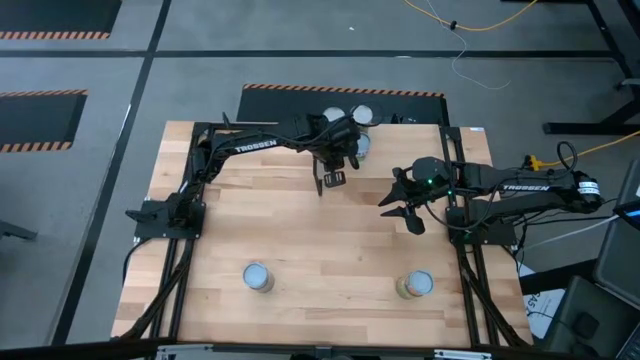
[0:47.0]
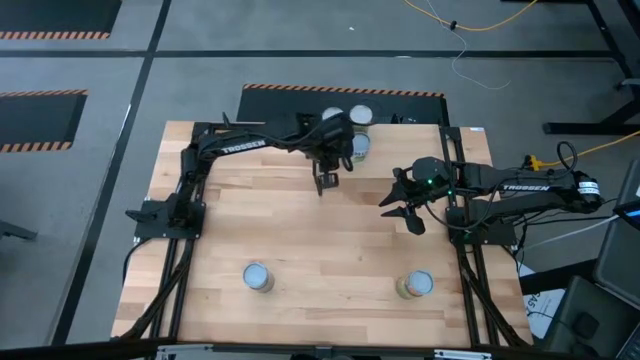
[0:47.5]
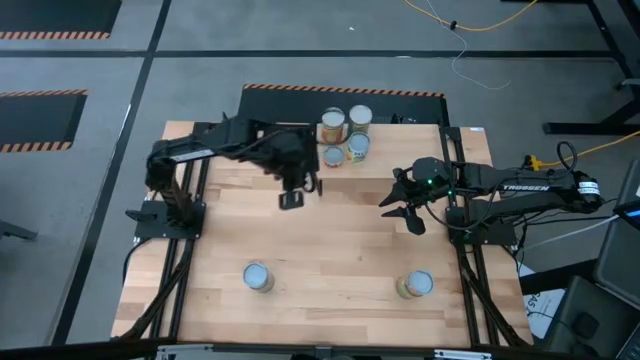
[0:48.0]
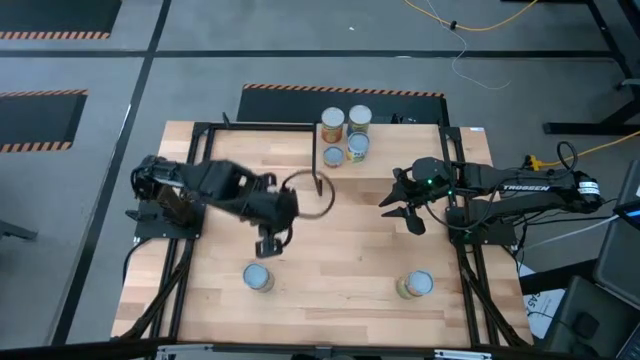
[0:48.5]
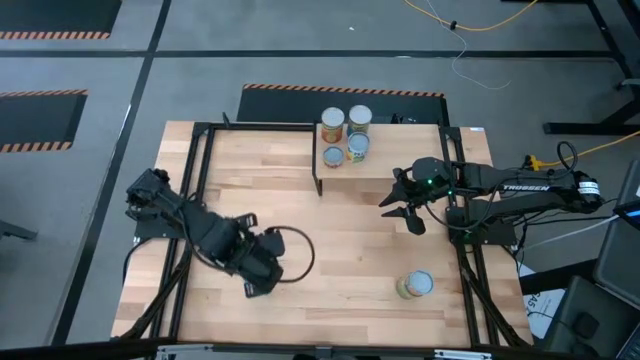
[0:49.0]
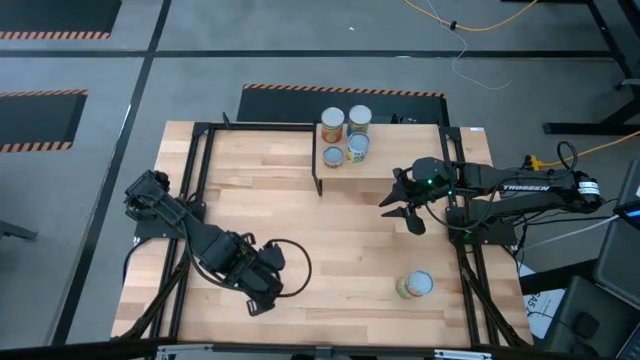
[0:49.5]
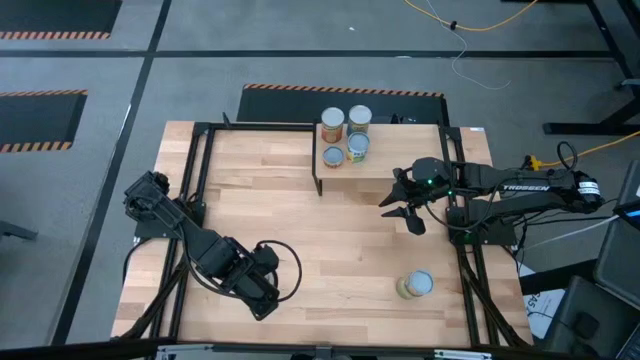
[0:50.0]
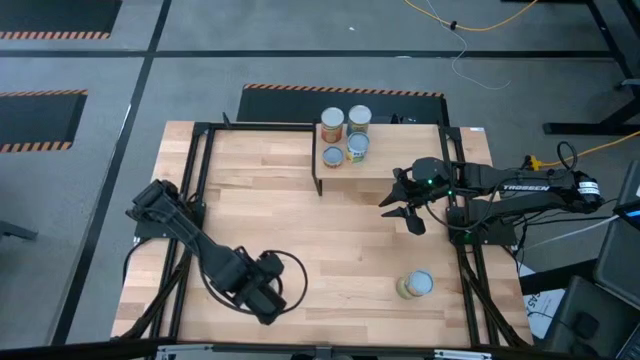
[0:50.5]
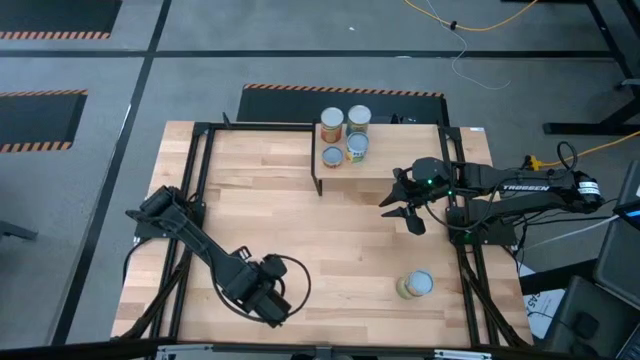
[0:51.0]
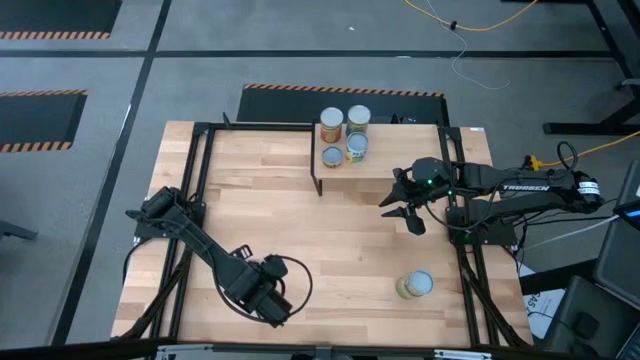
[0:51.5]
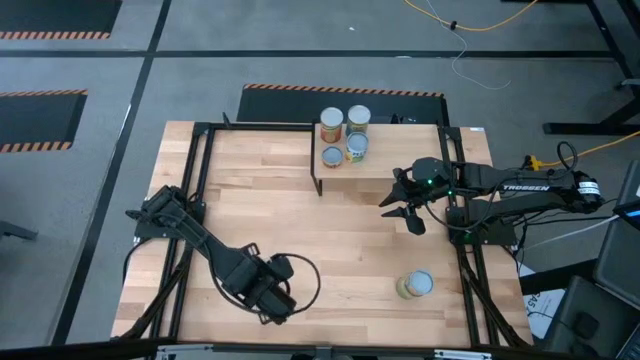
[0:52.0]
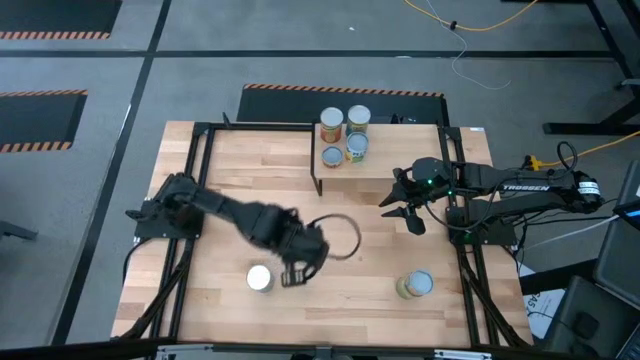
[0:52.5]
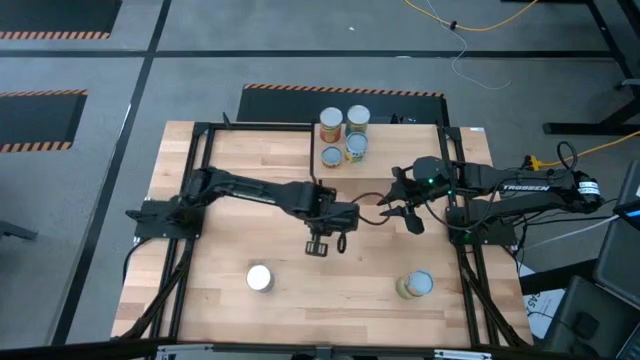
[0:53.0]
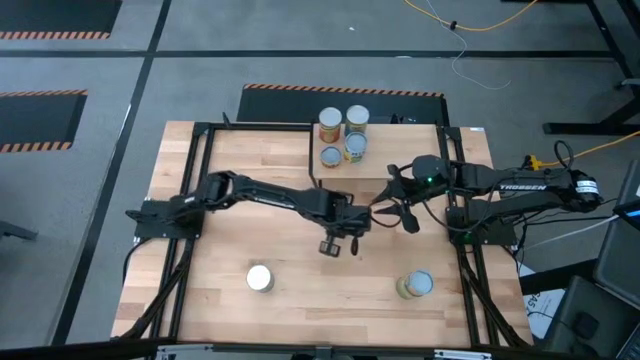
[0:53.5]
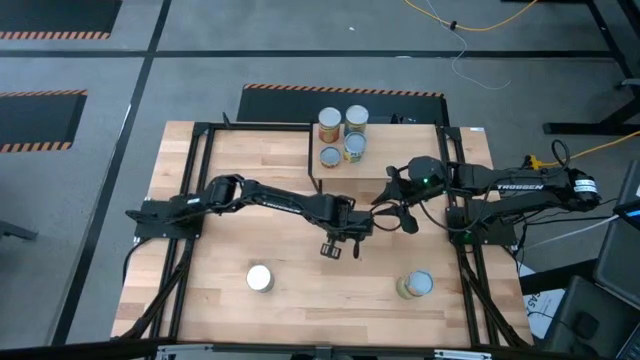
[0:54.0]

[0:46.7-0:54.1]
Task: Pick and place cans onto a shelf
Move the green canned sliced peaches to the center of the table

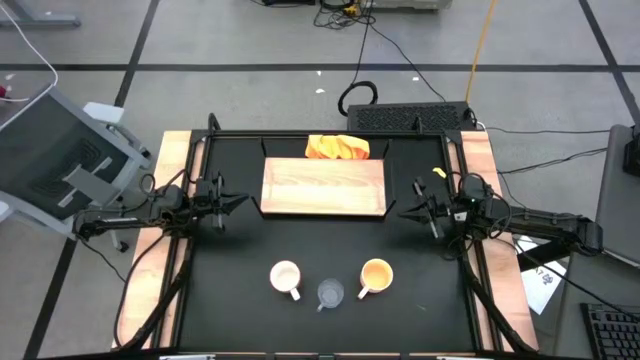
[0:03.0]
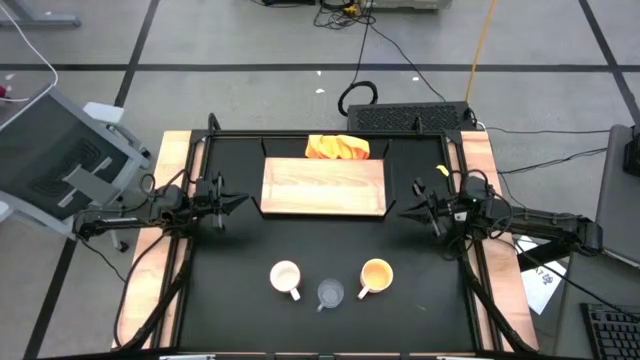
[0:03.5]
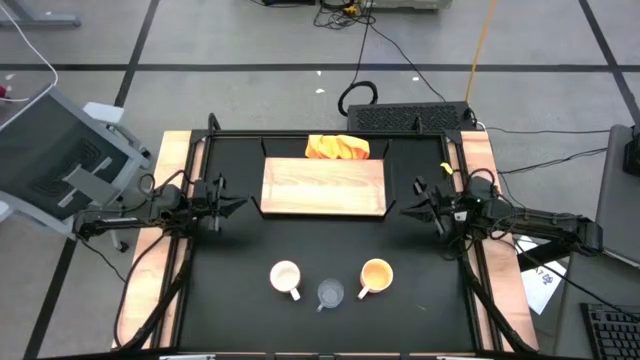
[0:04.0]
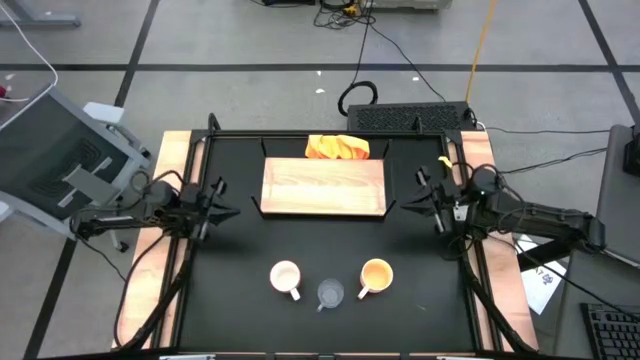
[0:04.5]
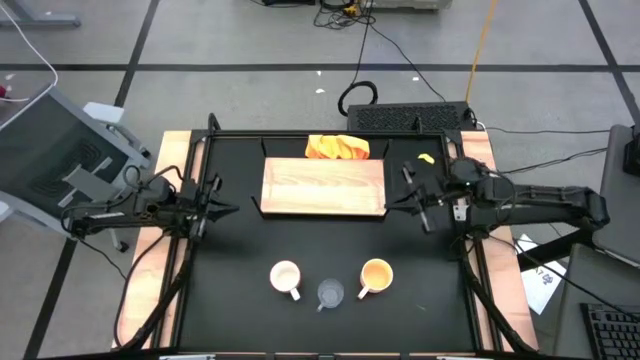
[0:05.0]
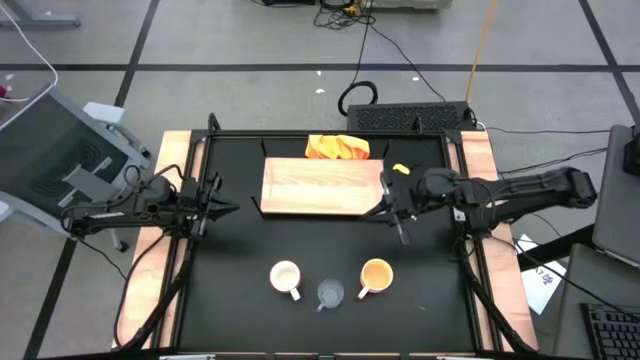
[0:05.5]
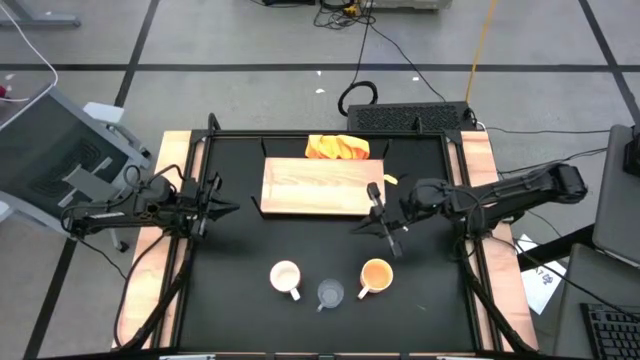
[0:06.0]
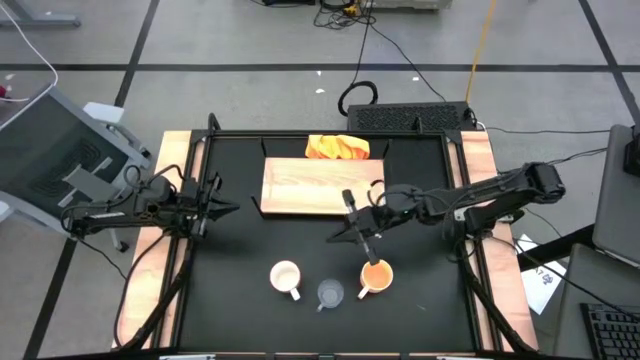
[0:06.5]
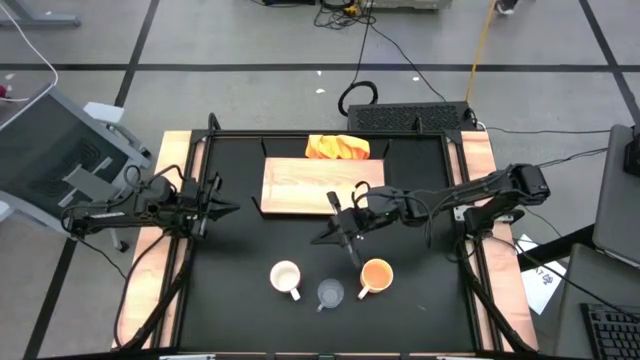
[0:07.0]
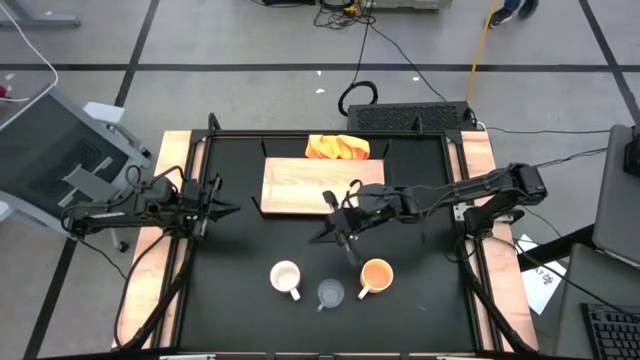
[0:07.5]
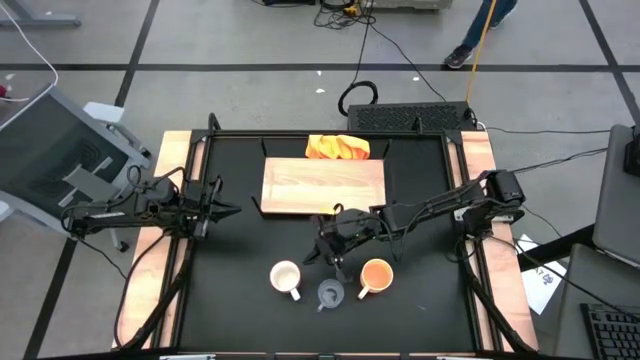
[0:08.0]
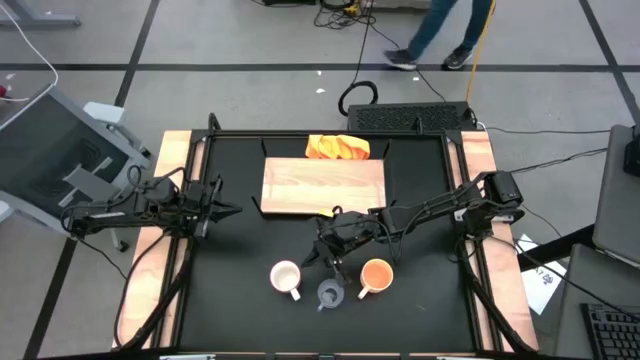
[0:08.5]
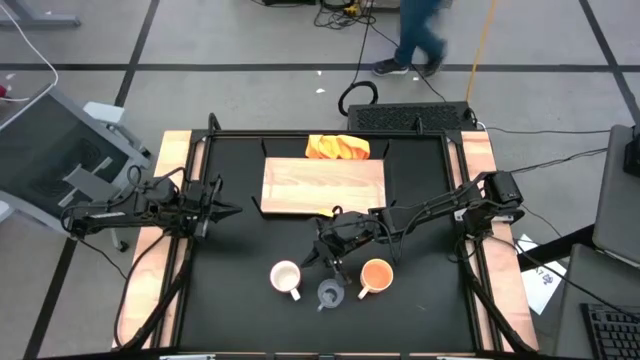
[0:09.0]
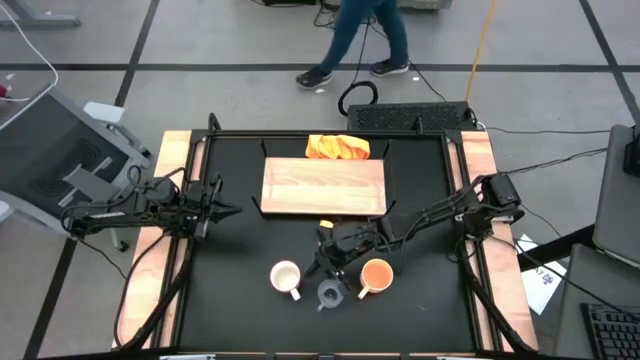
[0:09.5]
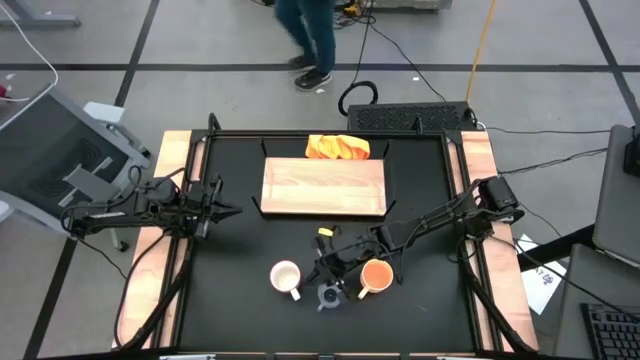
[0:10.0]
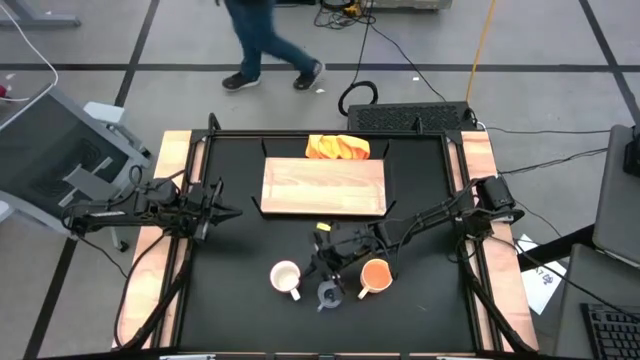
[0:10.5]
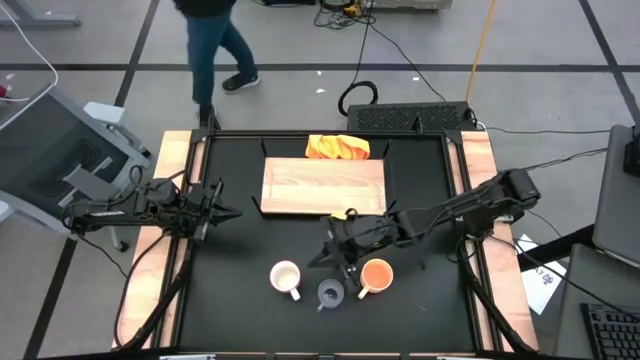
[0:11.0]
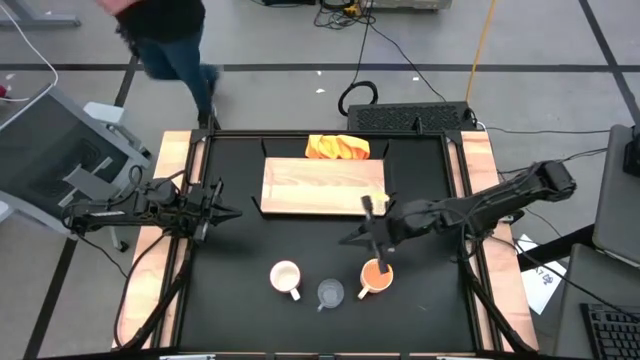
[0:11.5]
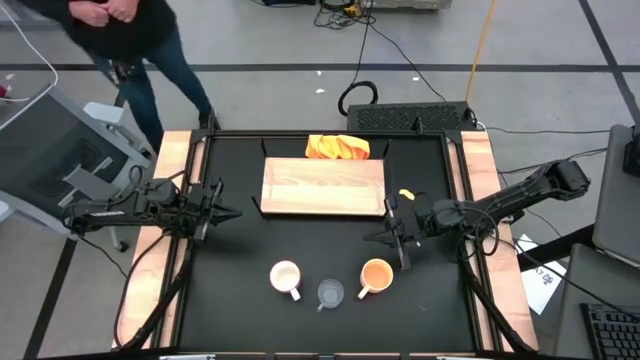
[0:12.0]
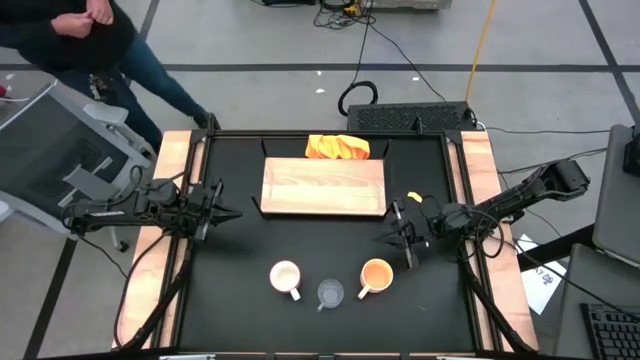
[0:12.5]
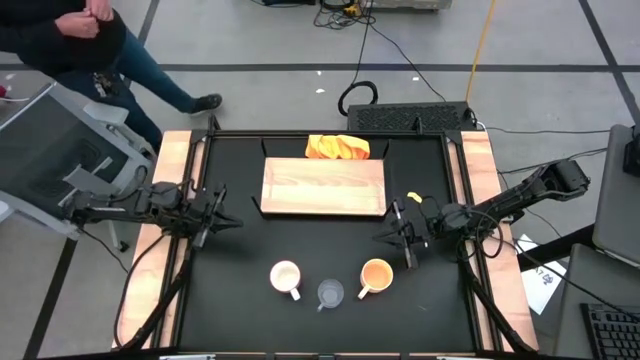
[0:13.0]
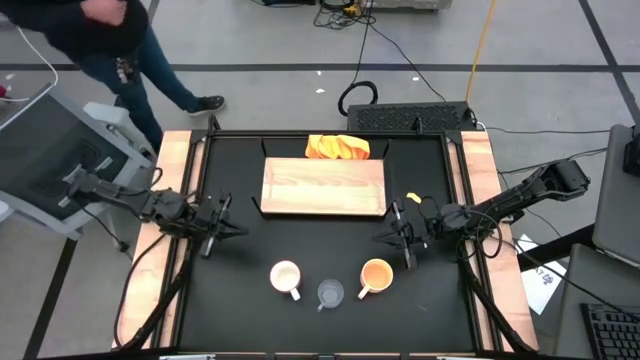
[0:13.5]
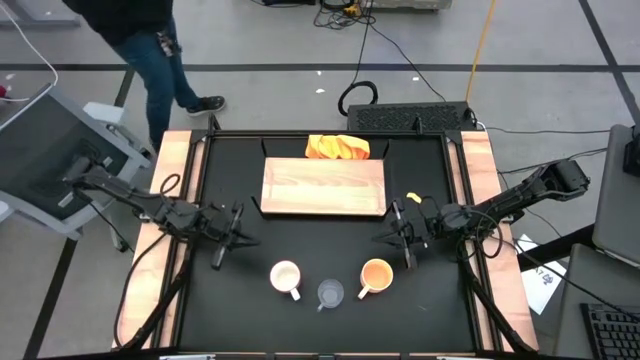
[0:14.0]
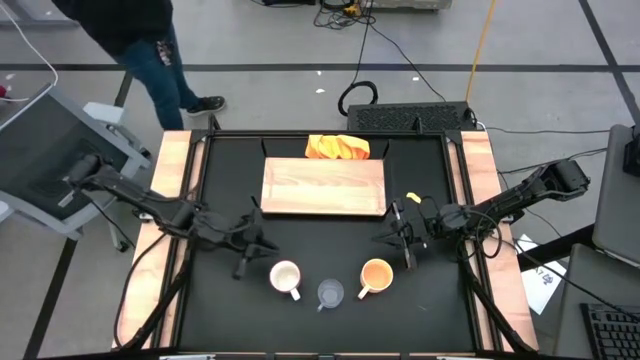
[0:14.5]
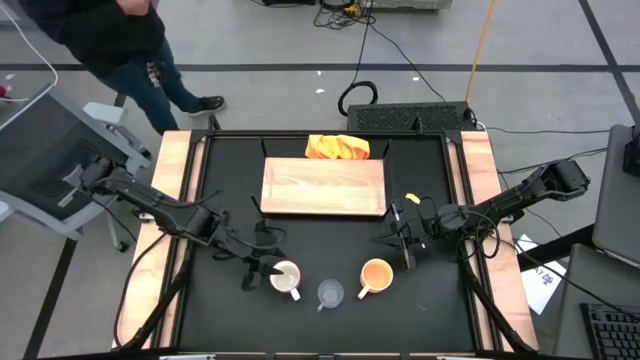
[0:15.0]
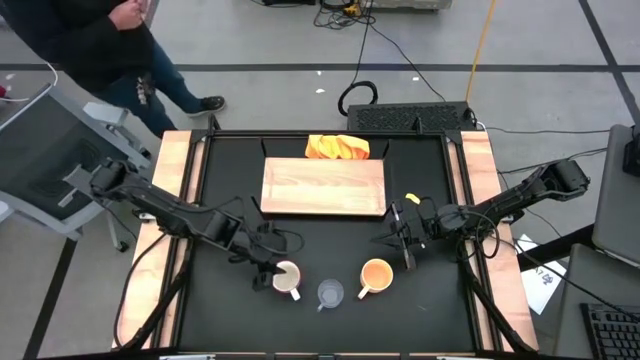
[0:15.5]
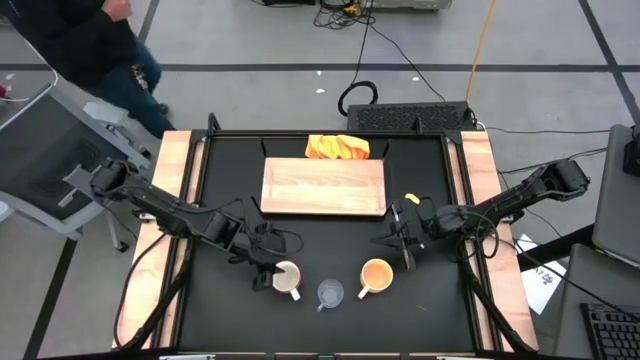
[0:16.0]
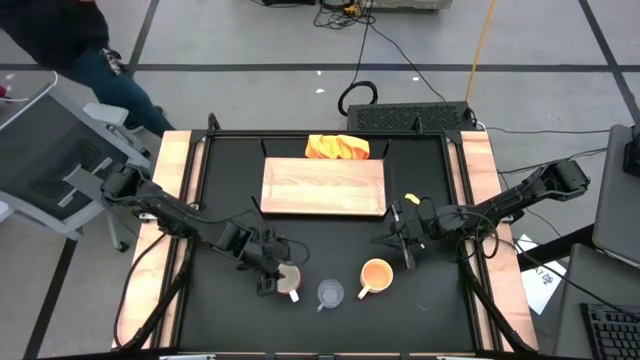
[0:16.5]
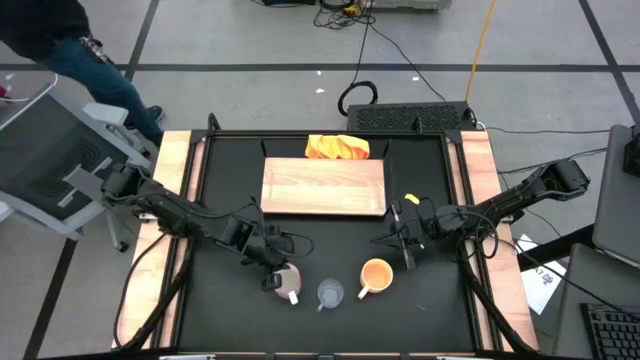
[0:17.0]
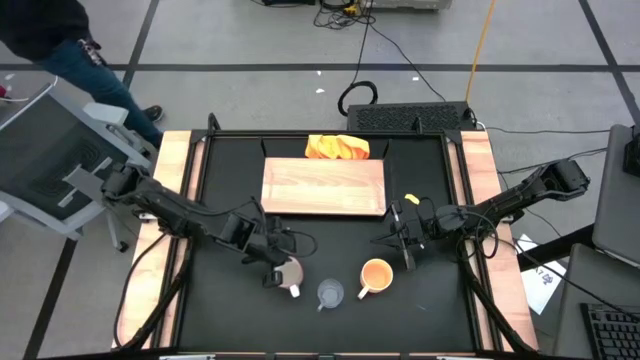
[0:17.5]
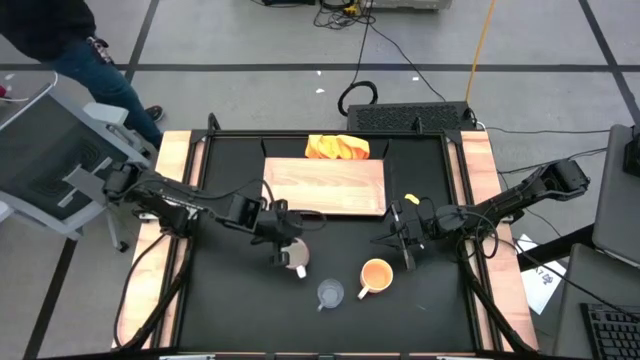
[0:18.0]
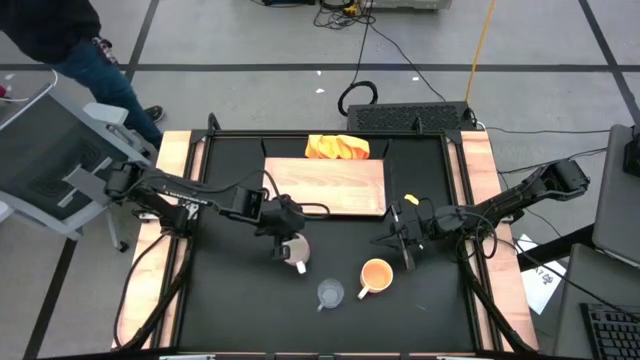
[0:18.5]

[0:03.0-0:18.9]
Task: Stack small to large cups/mugs on shelf
Put the grey cup on the shelf
